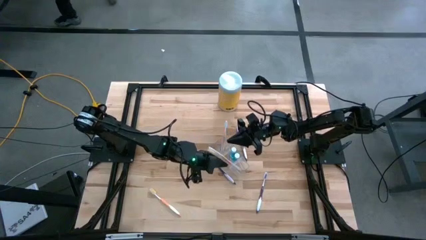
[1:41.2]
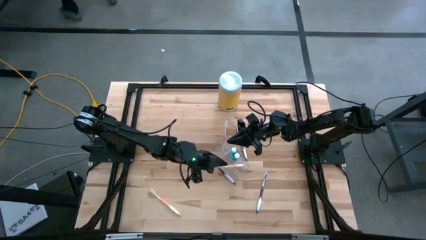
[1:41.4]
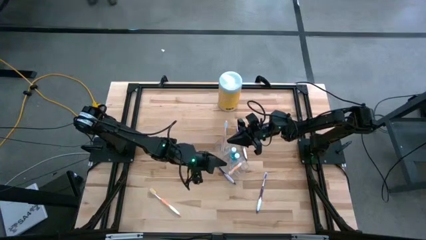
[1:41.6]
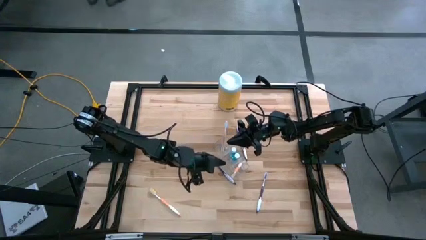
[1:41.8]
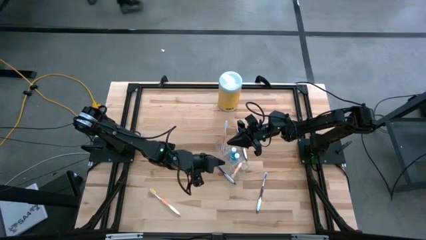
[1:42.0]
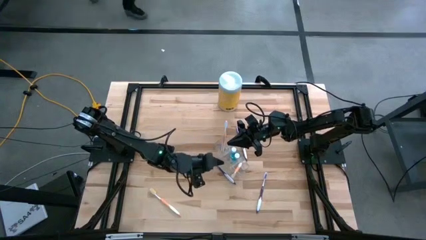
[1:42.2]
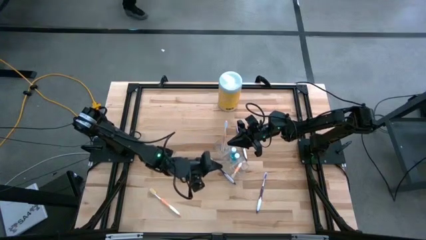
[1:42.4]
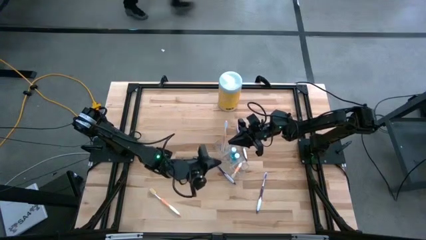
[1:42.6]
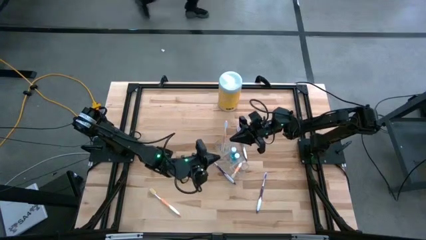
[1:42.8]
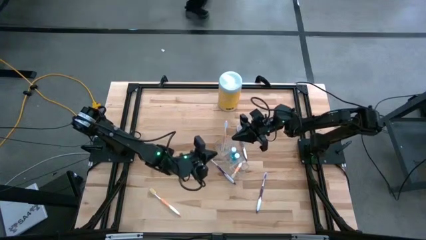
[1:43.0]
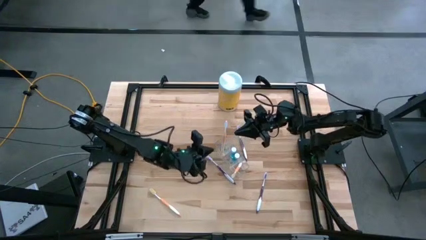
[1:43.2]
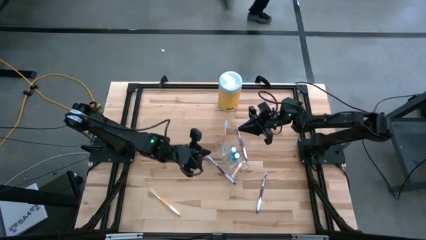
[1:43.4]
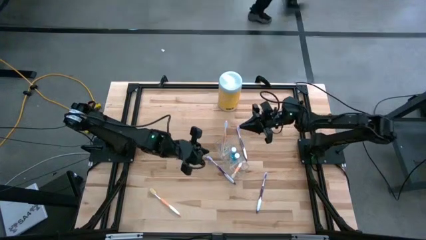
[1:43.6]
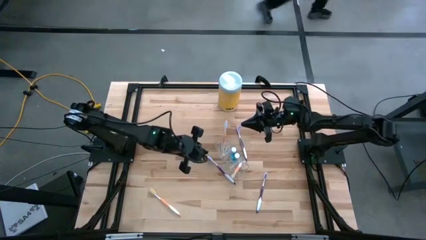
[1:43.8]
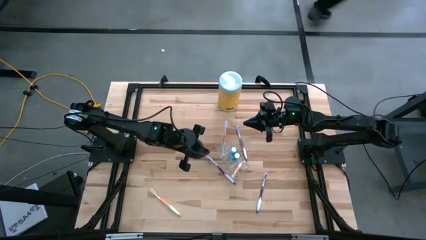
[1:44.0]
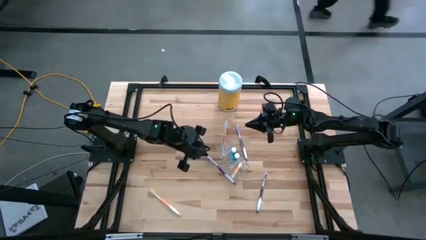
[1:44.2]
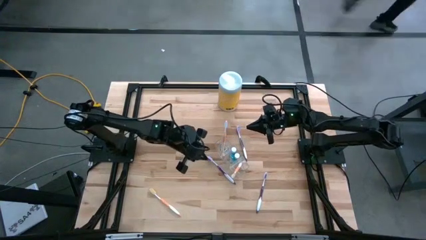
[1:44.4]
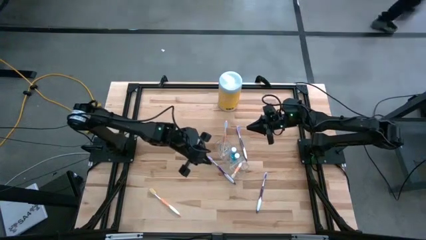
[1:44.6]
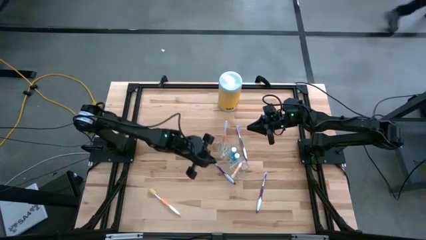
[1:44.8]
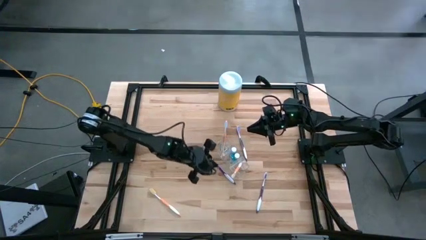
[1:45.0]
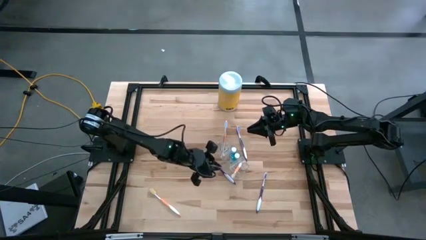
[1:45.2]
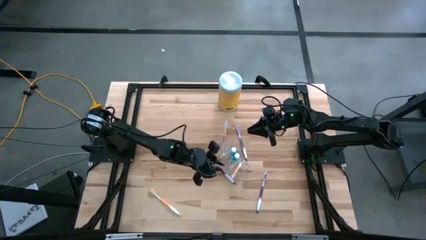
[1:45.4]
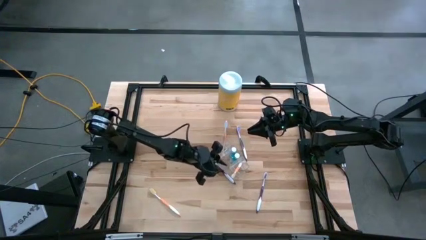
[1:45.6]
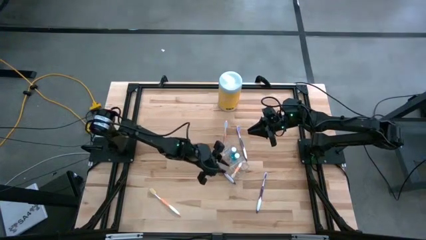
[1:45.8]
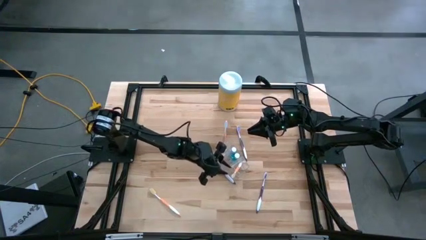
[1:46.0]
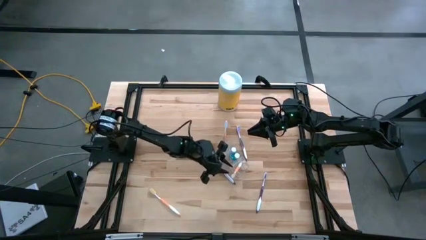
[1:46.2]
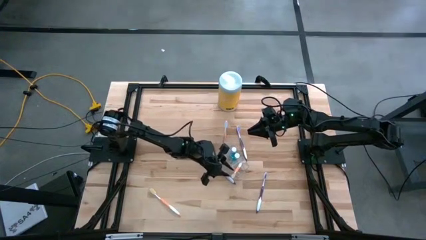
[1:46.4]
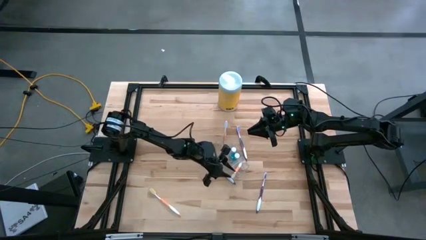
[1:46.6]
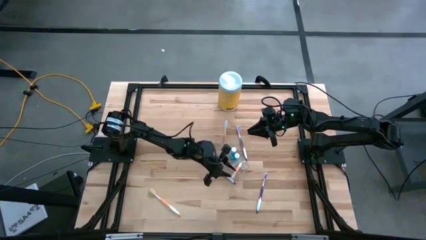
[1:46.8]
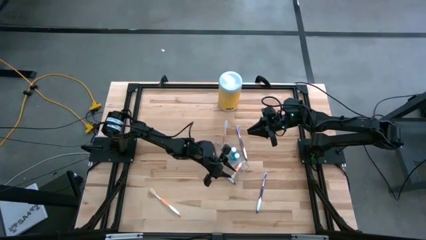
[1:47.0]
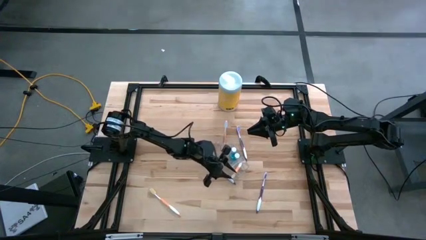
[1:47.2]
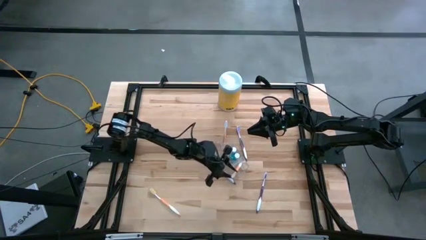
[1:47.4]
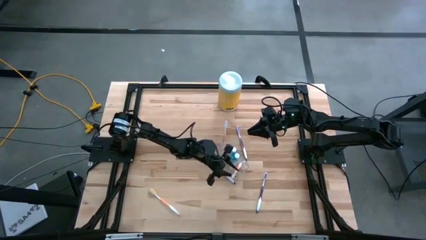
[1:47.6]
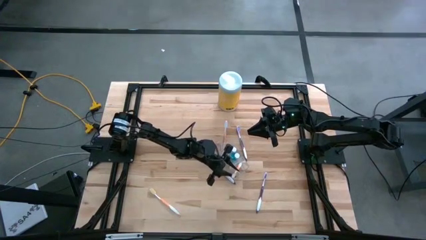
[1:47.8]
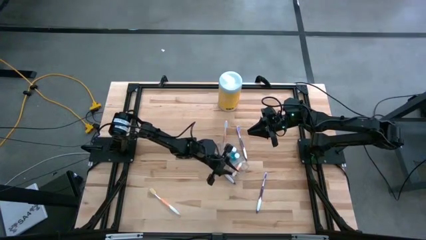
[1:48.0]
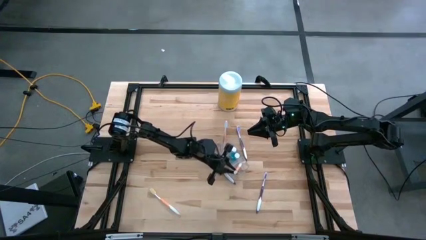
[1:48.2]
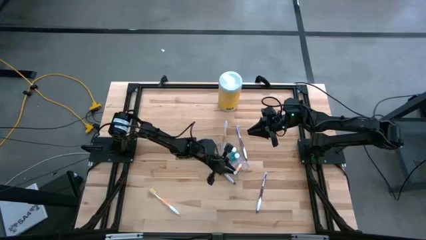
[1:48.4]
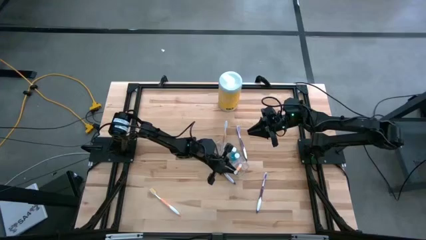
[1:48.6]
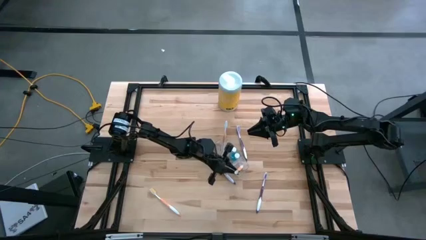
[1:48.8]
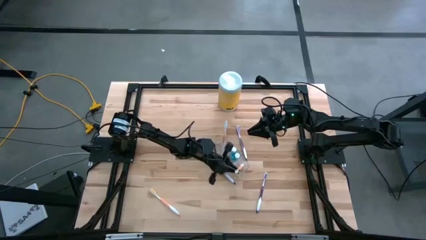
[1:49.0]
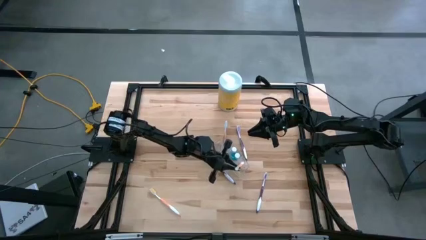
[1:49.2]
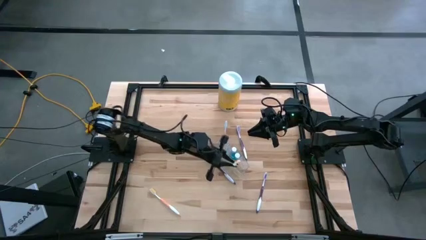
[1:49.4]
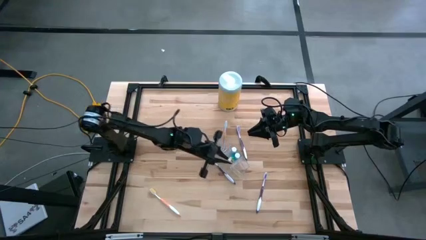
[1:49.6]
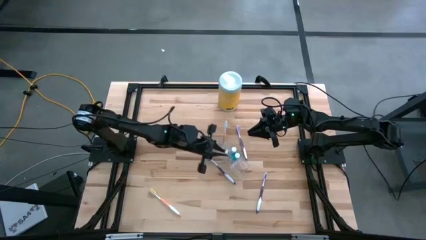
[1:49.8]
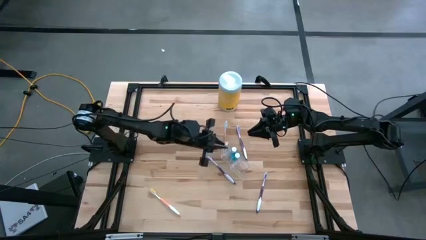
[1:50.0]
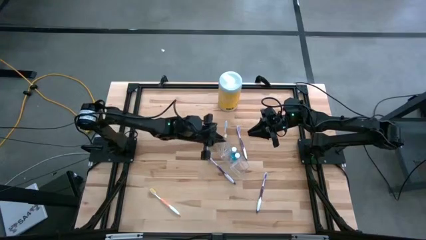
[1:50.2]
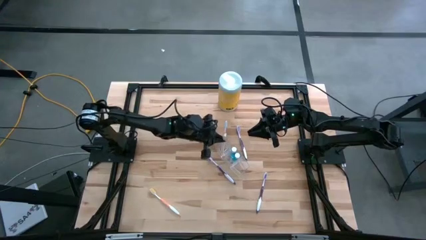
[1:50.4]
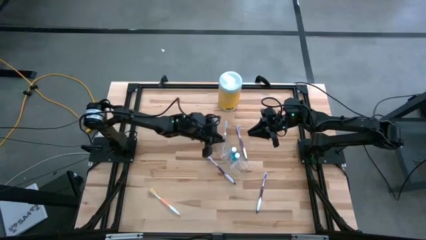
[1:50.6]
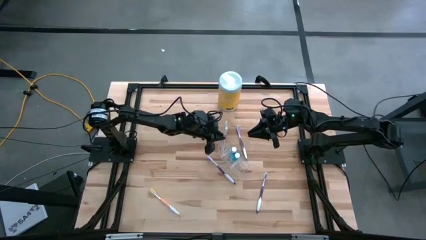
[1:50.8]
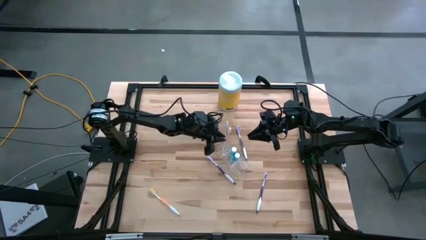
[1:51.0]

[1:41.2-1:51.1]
Task: Pick & Place toothbrushing station
Put the top orange toothbrush into the top compartment of the transparent organizer
